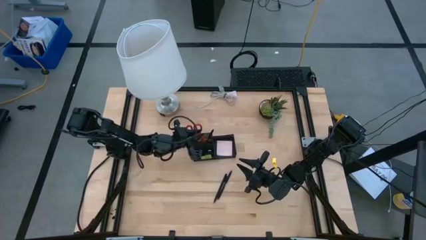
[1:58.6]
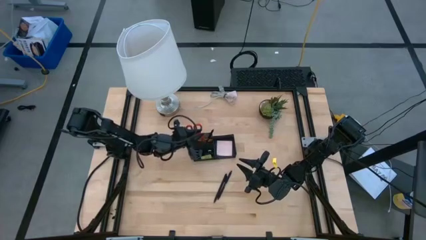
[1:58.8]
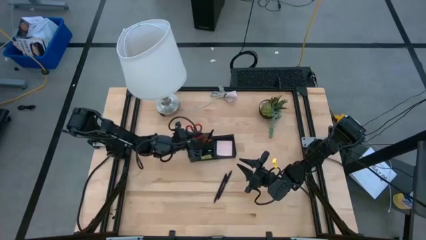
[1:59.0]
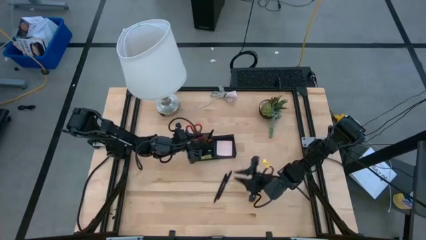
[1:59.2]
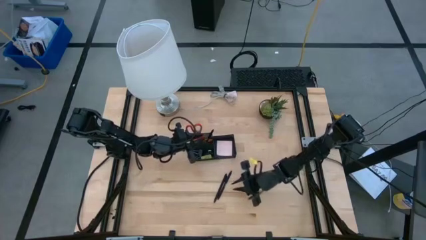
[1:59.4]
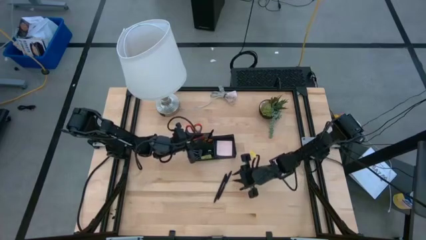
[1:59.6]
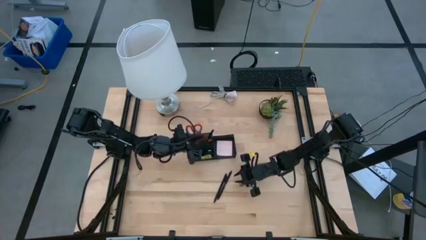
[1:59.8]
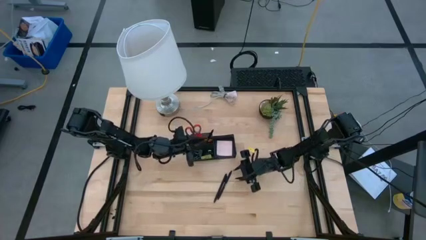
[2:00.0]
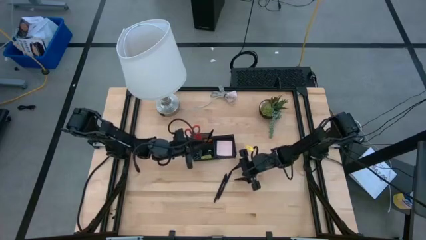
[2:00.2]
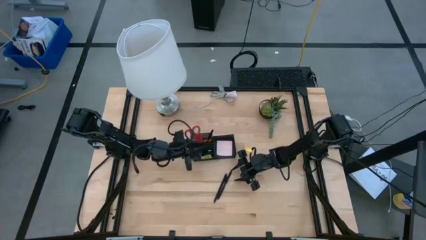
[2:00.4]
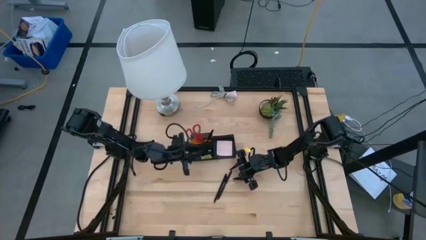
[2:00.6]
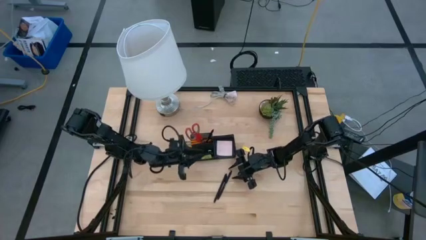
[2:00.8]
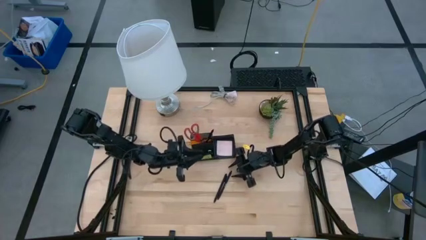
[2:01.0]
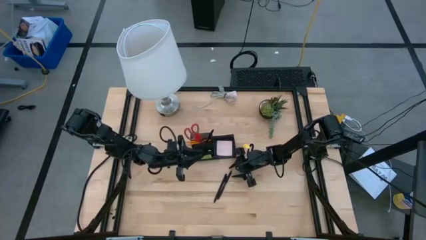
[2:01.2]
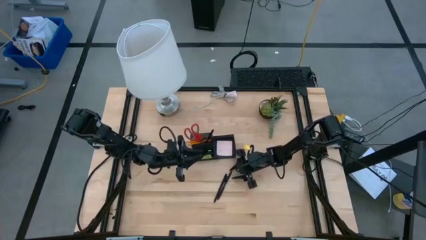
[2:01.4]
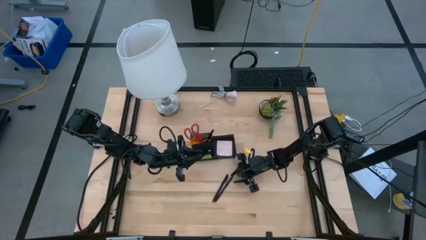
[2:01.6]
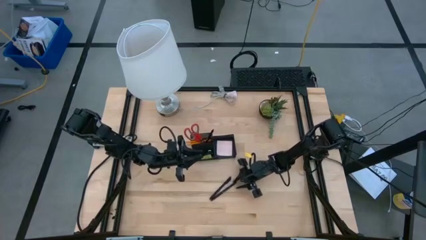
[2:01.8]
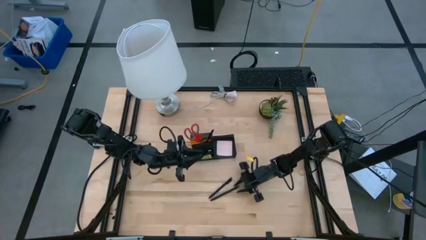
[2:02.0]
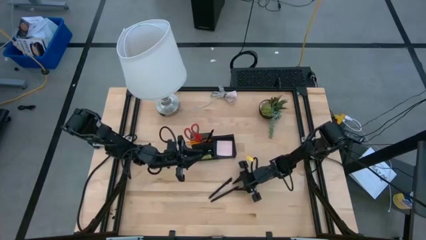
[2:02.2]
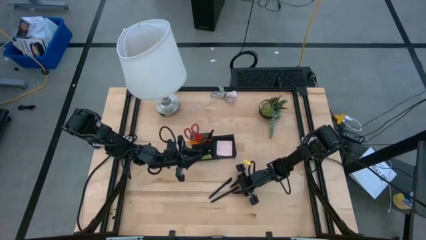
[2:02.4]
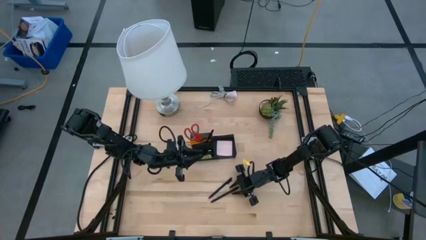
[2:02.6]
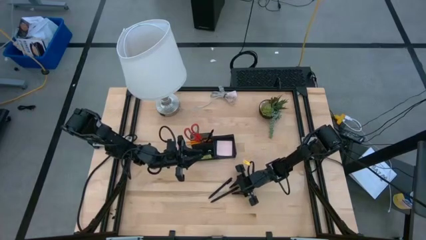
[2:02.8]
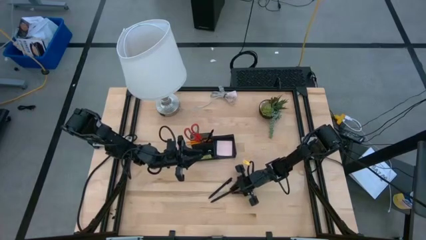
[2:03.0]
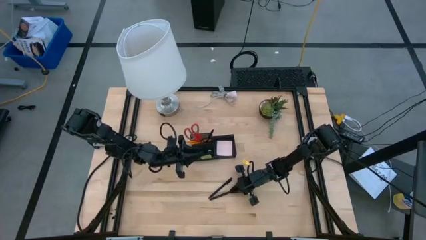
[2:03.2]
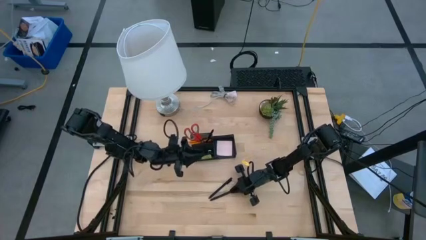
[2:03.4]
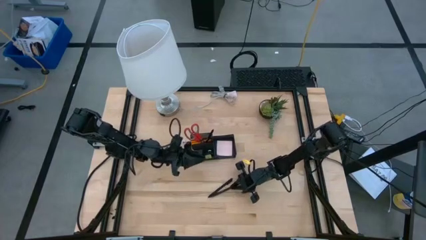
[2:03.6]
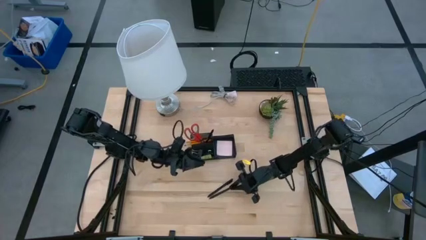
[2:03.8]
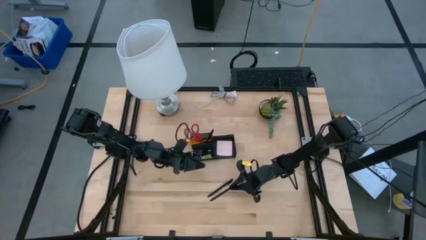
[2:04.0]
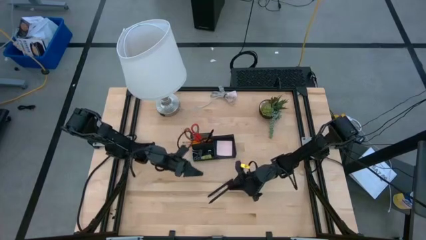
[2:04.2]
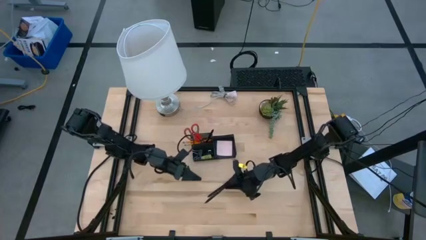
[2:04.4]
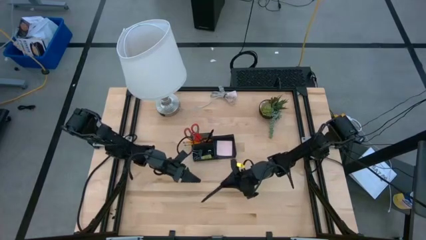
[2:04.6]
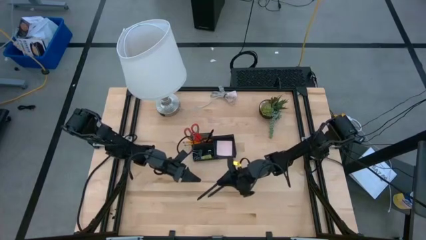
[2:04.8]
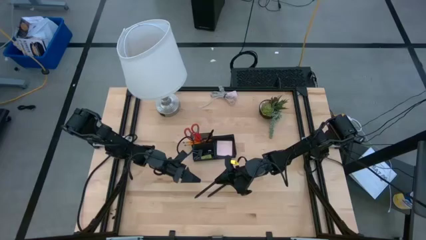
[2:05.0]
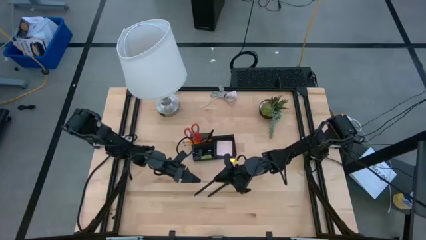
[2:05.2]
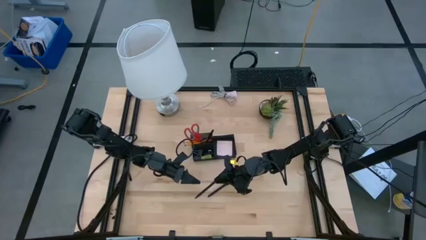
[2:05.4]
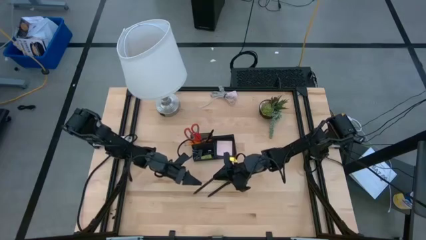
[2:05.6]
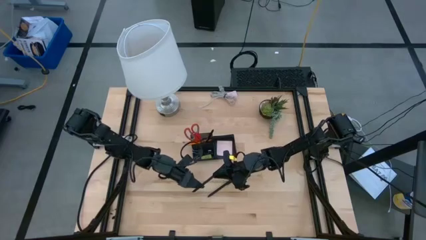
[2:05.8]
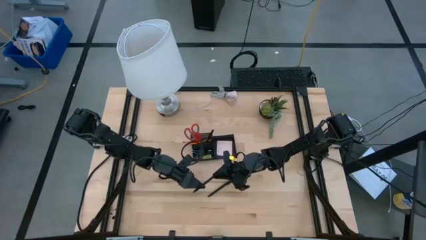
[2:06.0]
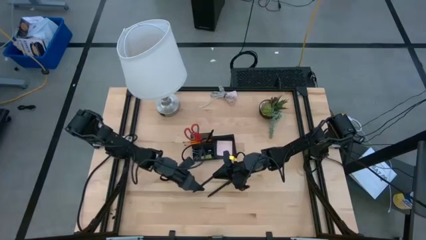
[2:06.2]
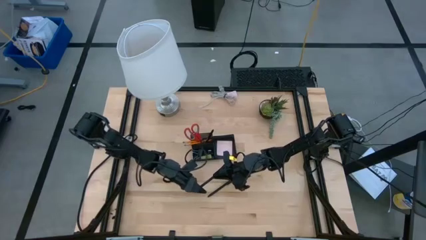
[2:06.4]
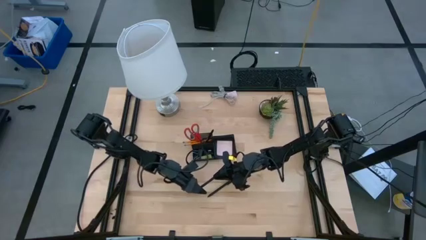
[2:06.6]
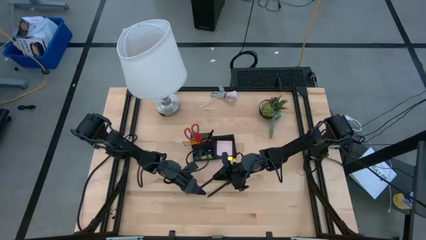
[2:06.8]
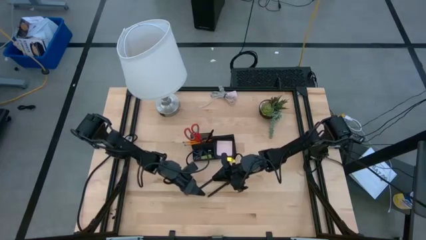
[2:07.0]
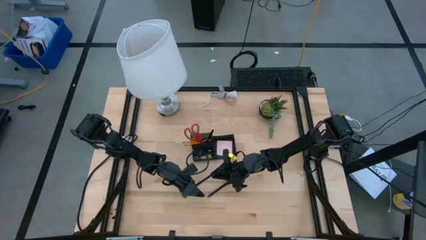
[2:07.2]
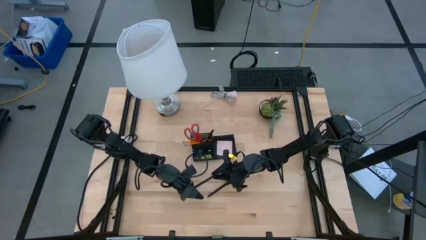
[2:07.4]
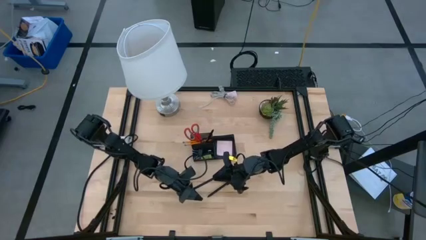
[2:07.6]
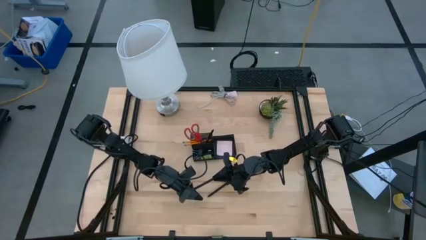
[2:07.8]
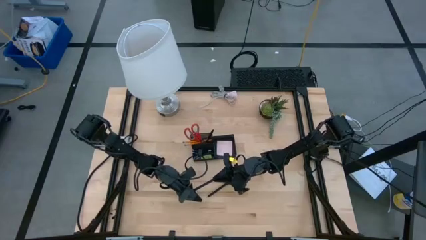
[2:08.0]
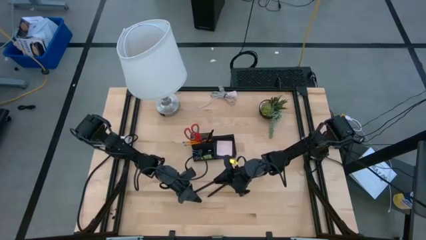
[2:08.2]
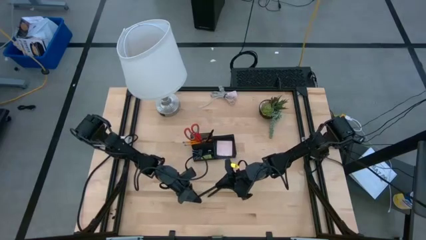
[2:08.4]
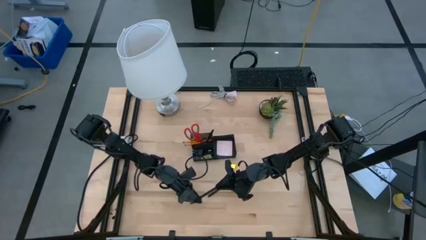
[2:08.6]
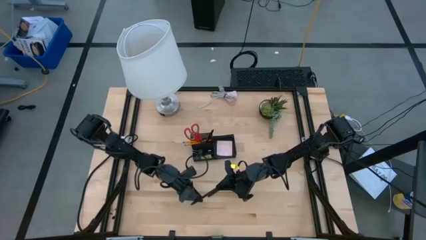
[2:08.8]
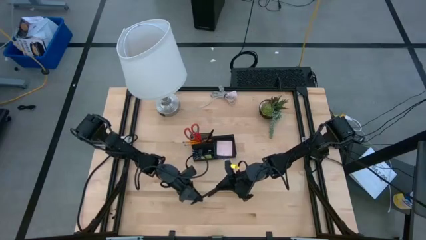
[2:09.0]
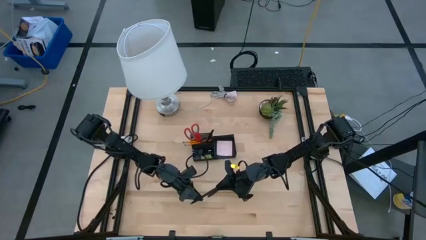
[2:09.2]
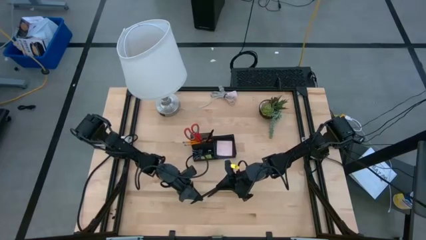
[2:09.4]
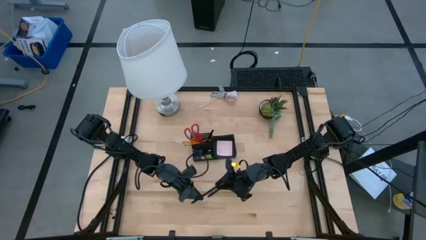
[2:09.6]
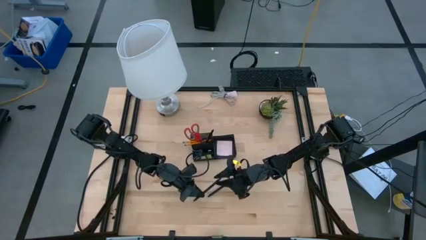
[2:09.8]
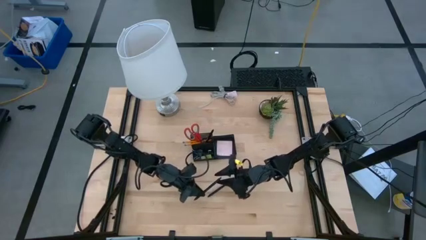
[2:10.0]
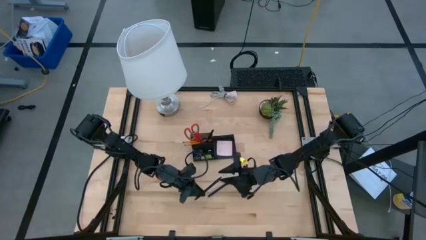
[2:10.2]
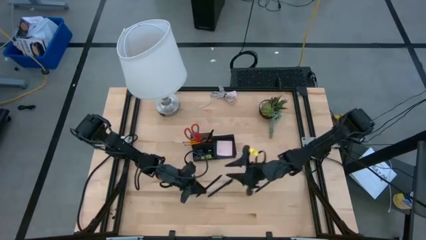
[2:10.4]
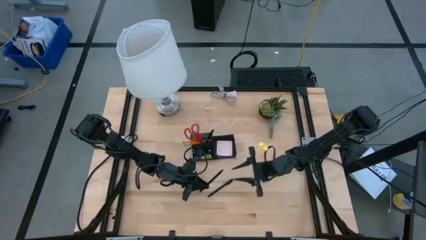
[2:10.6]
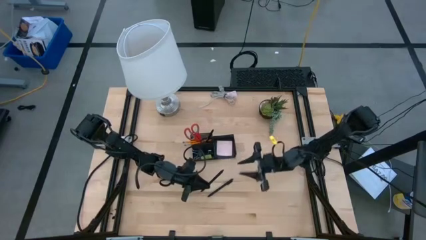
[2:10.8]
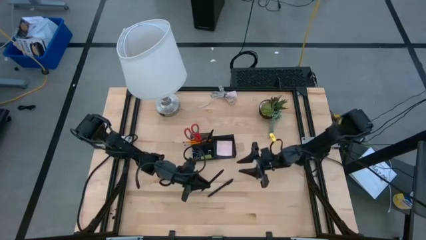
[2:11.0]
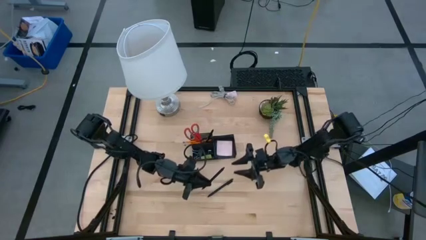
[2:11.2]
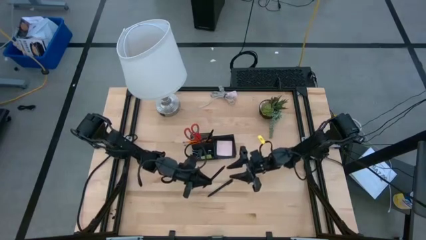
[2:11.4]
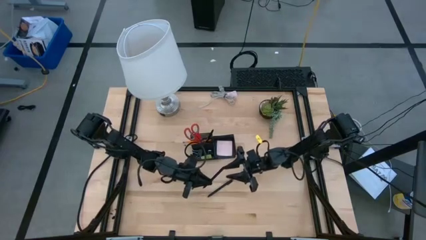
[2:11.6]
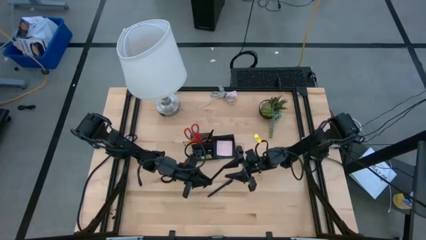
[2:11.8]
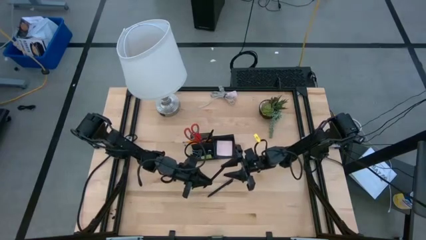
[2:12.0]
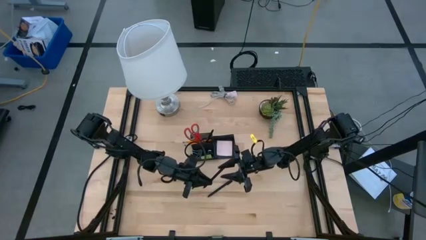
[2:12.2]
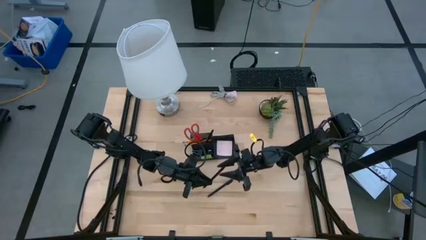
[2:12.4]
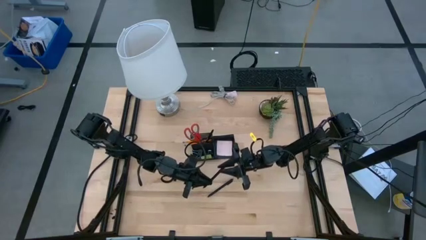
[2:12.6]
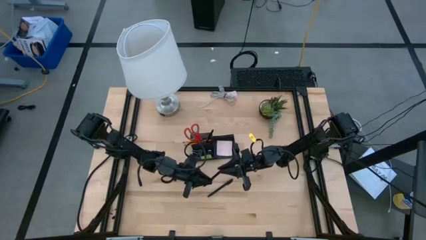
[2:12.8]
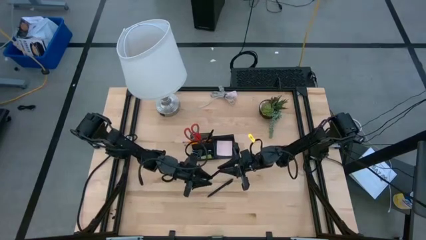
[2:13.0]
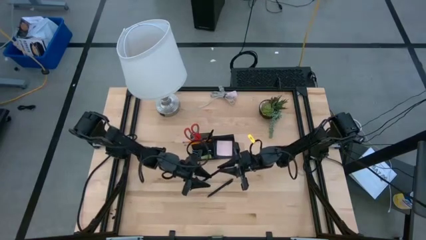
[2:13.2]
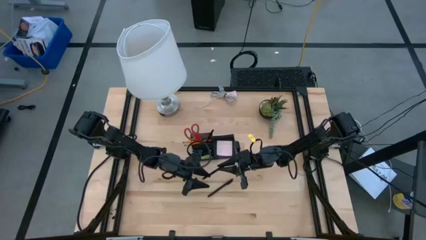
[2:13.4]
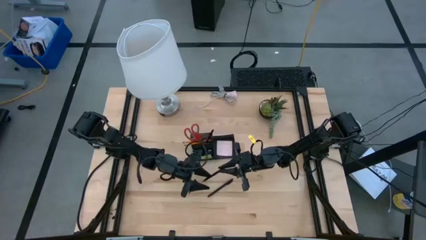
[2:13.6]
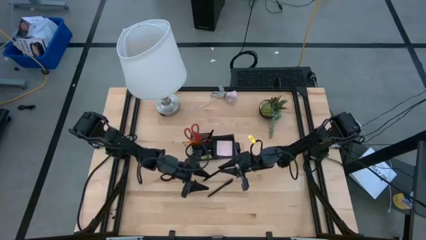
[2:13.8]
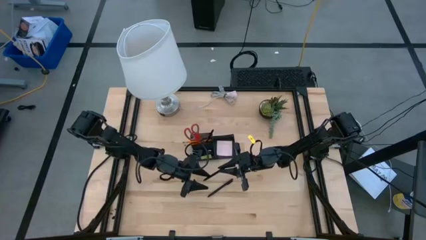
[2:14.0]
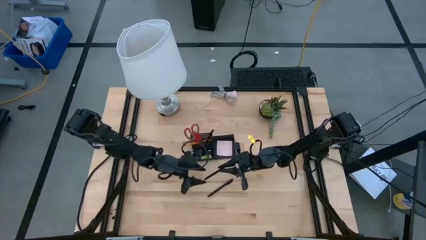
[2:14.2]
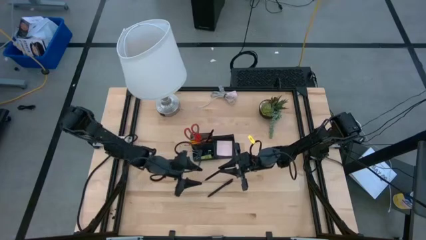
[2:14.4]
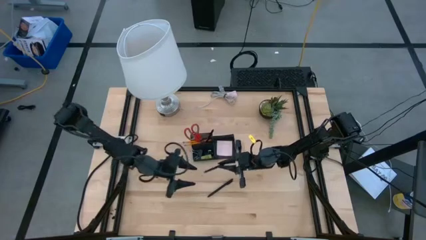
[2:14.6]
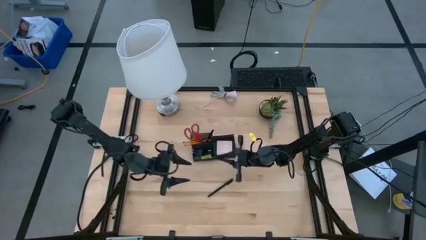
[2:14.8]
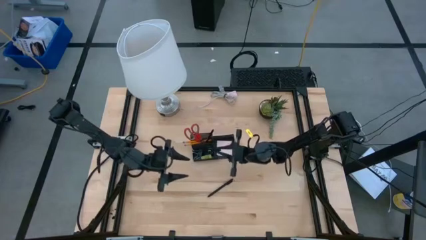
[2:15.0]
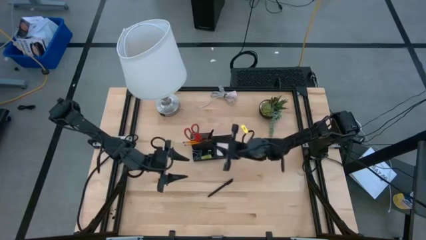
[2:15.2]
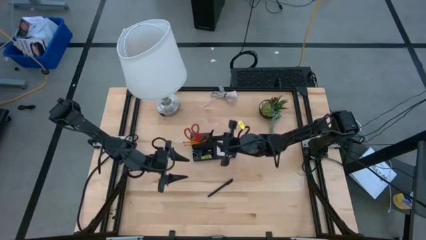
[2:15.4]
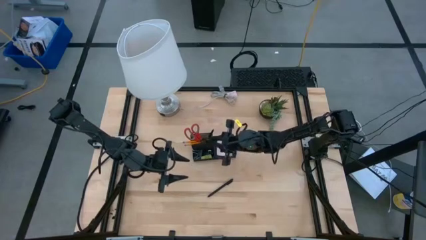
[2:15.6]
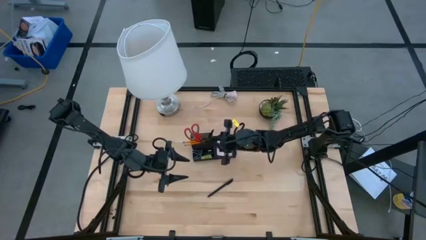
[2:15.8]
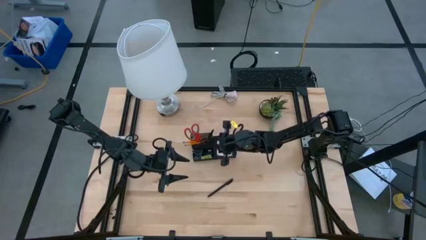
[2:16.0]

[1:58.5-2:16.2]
Task: Pick and place office supplies into organizer
Put the black pen into the black desk organizer
